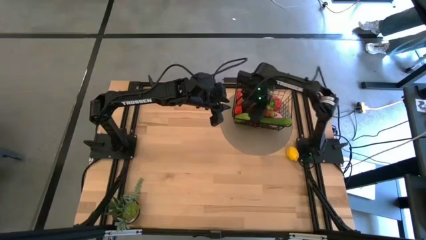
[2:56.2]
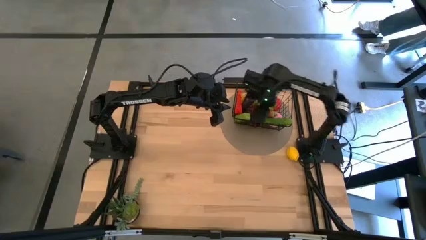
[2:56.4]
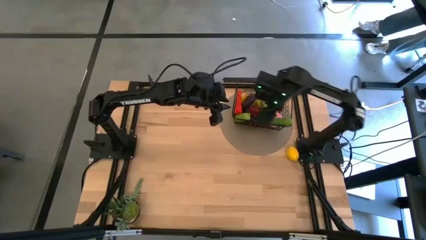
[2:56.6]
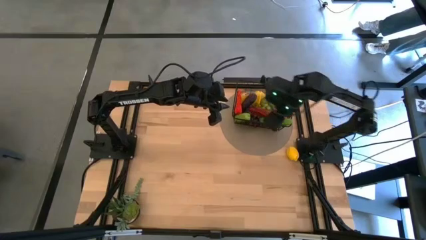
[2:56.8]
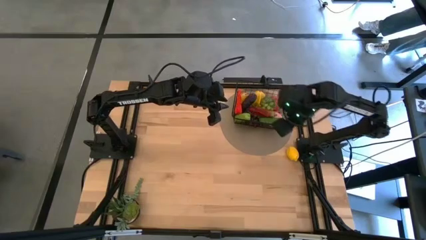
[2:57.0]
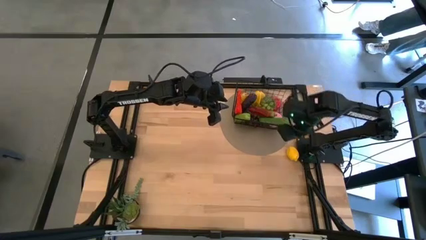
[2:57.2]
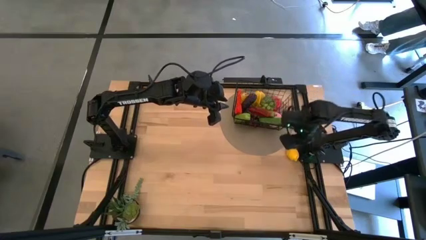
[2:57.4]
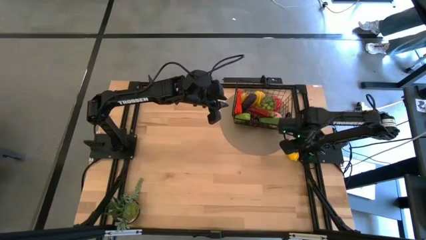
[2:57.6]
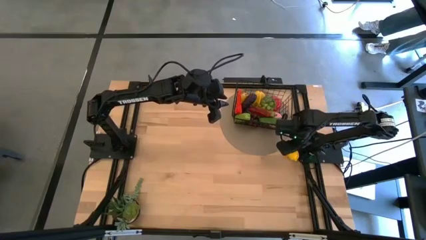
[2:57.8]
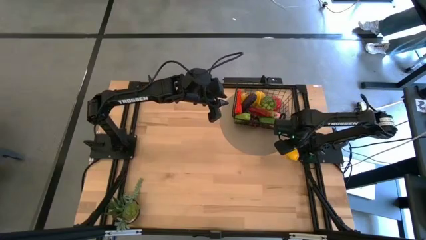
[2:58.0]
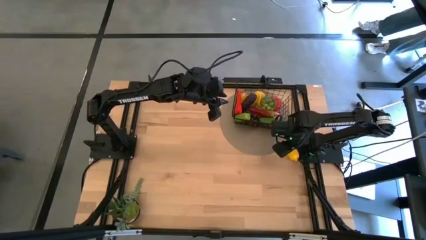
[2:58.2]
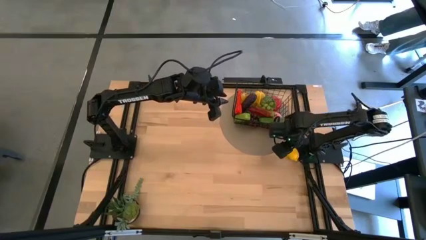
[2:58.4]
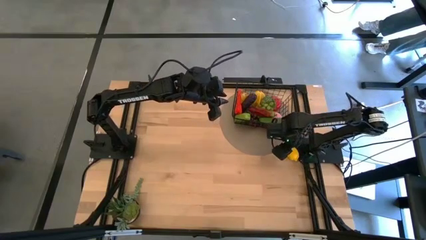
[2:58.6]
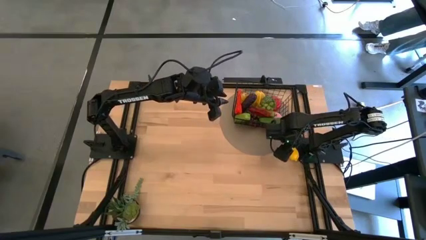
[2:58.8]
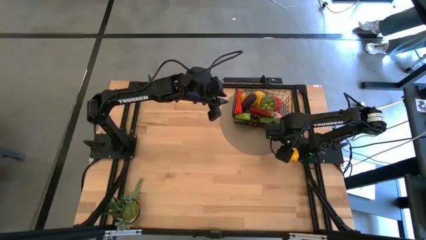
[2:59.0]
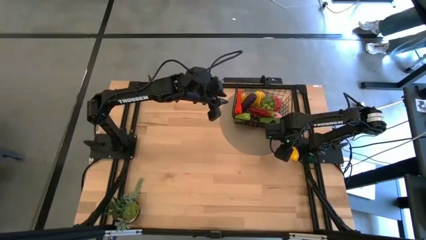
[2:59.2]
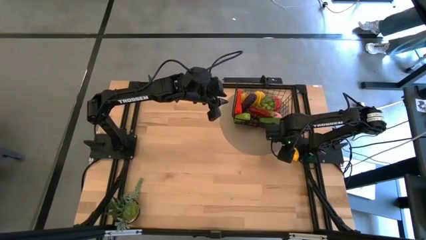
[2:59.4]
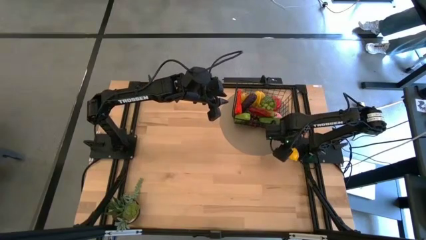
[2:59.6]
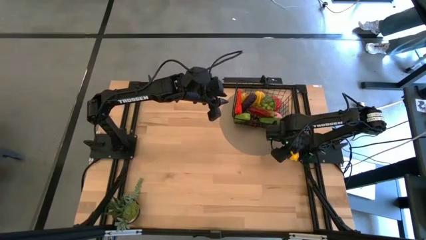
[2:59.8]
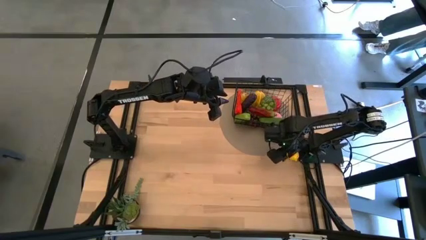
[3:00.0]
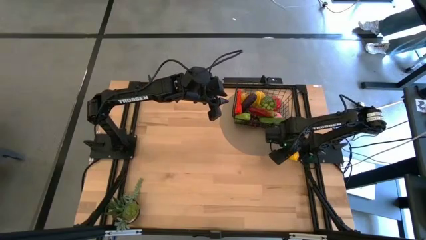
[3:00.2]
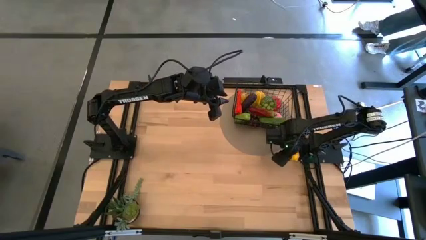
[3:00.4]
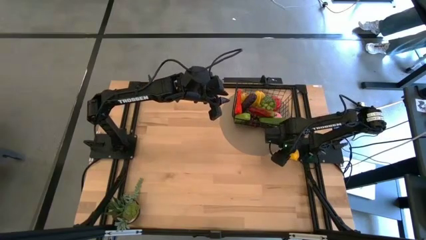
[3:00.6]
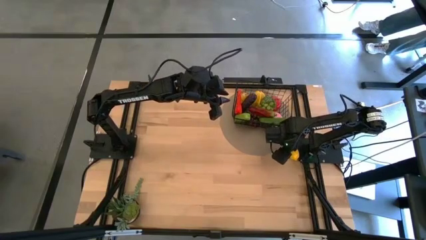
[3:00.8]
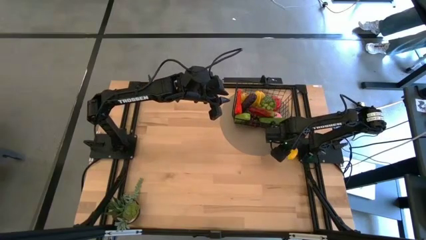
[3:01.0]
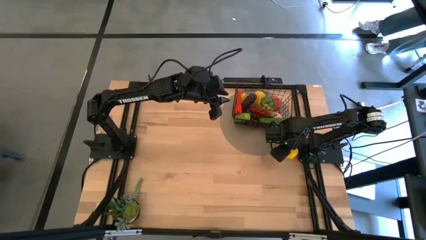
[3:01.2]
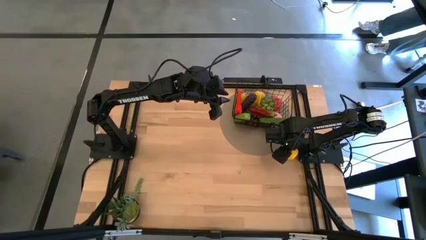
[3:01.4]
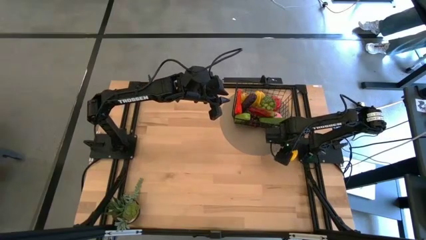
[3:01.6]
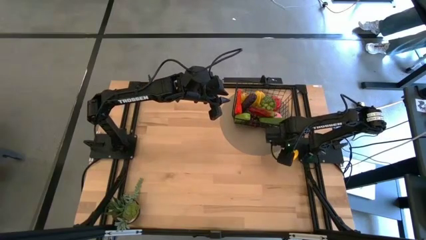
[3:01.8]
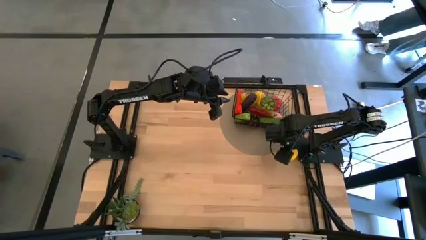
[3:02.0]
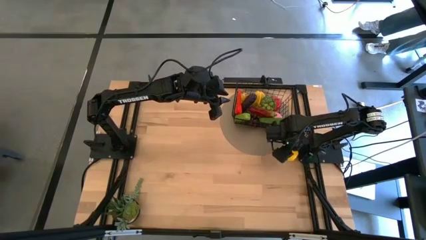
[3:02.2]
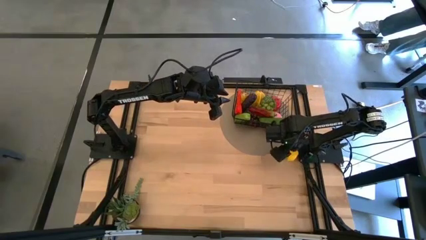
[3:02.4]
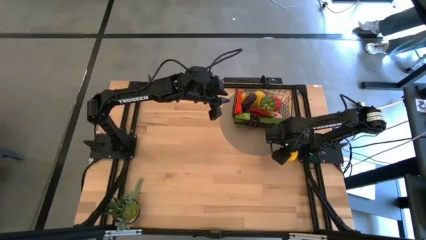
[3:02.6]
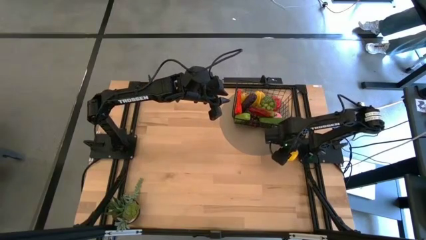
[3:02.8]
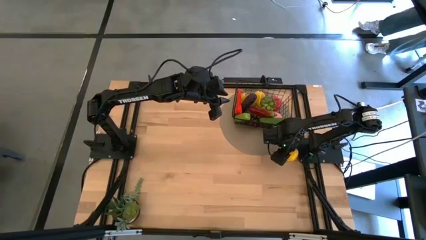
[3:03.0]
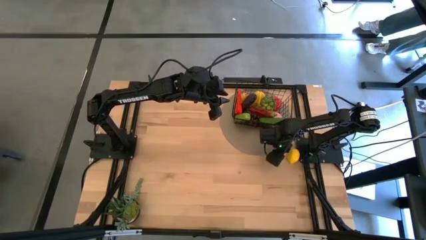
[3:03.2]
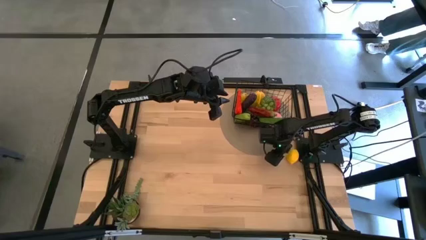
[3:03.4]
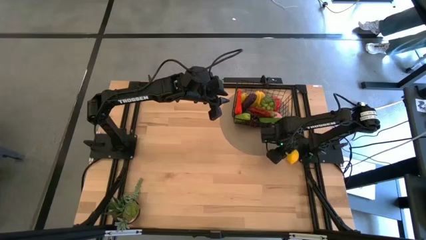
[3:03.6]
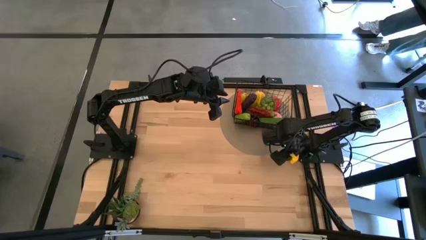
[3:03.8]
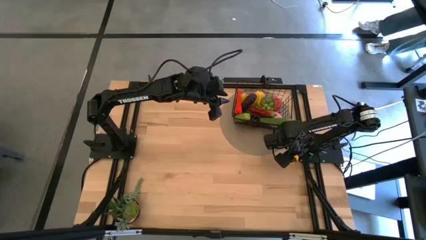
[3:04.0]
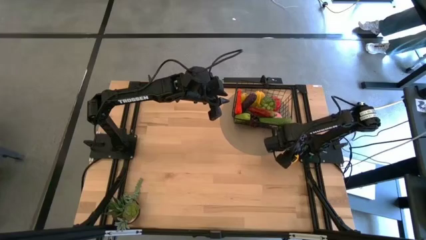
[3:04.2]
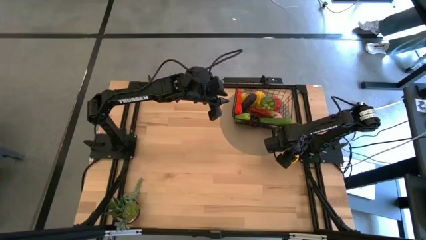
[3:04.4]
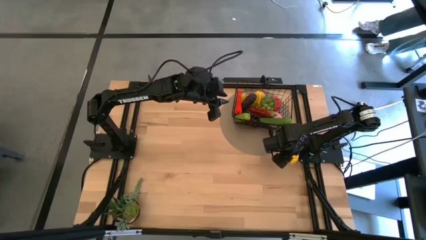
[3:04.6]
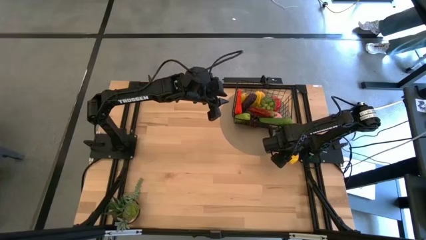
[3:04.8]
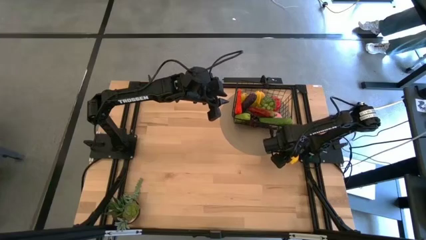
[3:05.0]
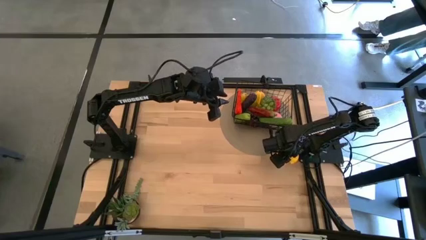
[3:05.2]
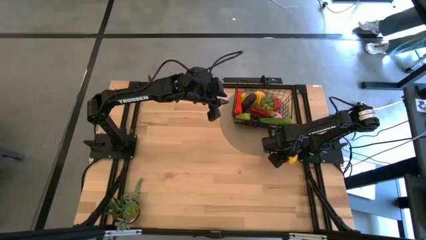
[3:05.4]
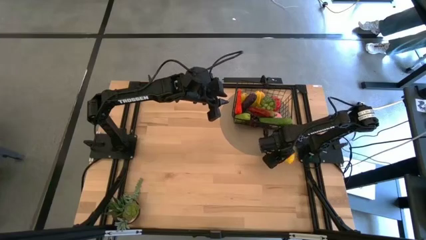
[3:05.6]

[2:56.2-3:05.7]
Task: Build produce basket
Put the yellow lemon into the black wire basket

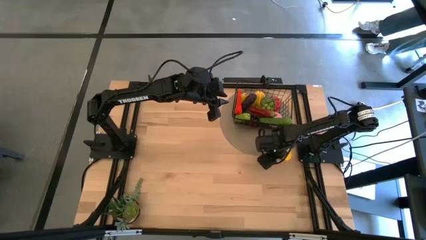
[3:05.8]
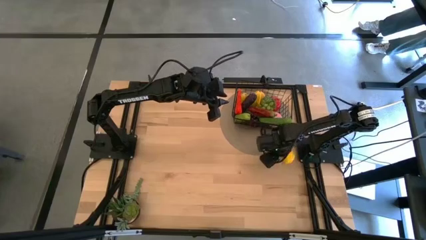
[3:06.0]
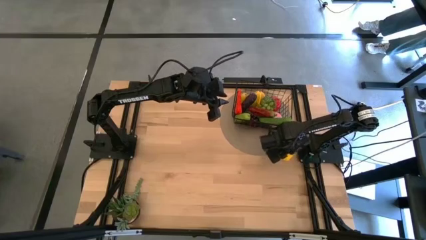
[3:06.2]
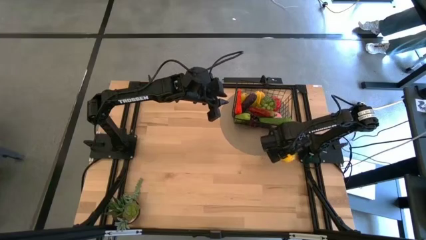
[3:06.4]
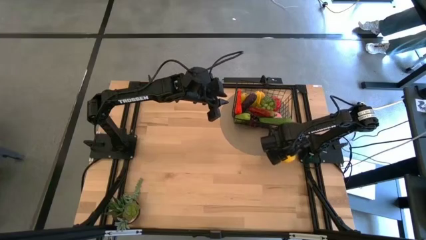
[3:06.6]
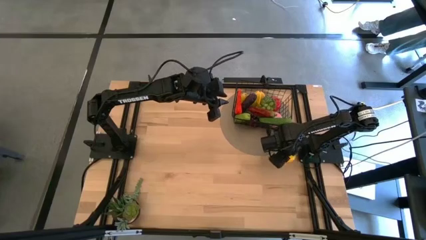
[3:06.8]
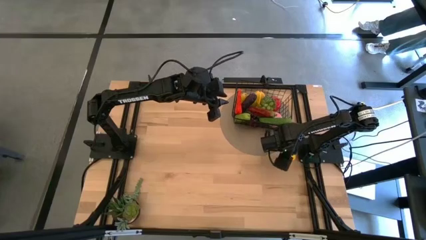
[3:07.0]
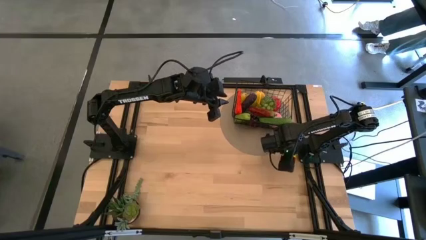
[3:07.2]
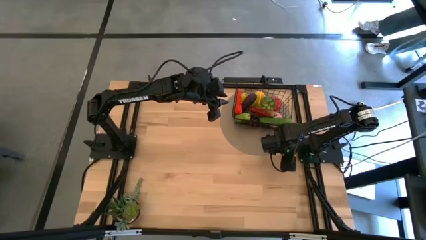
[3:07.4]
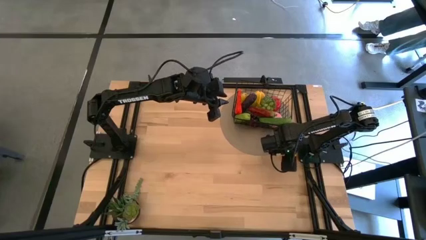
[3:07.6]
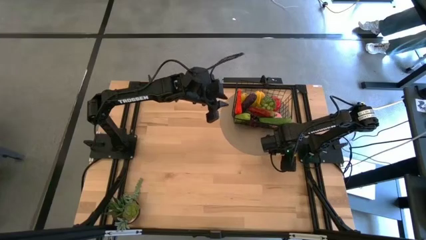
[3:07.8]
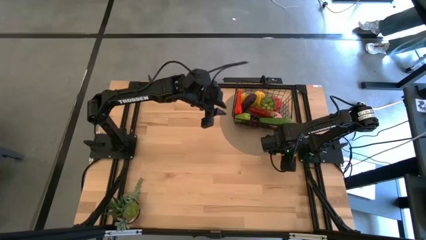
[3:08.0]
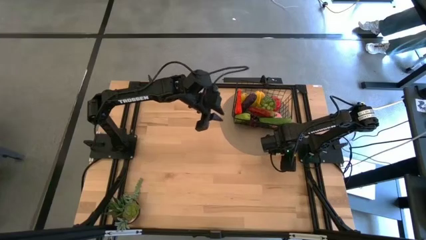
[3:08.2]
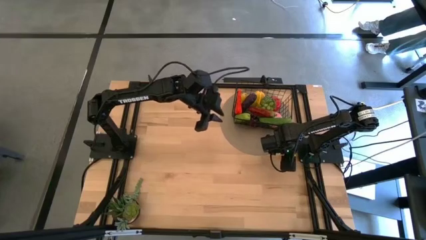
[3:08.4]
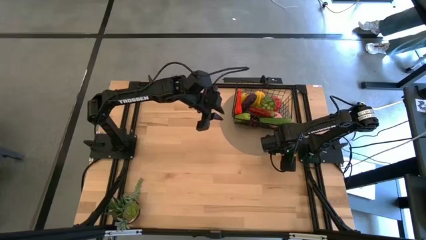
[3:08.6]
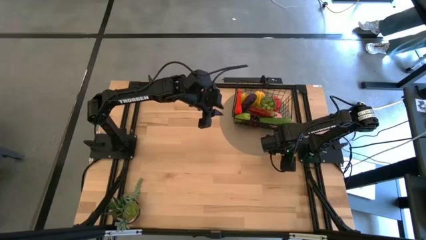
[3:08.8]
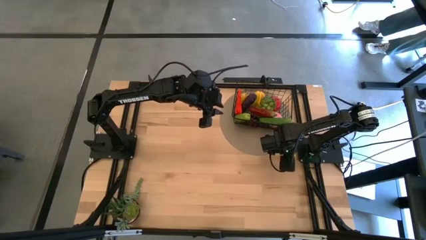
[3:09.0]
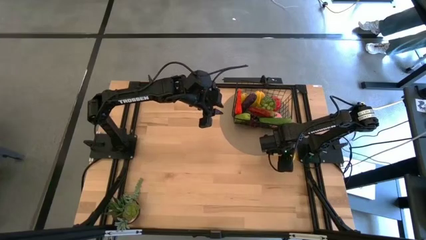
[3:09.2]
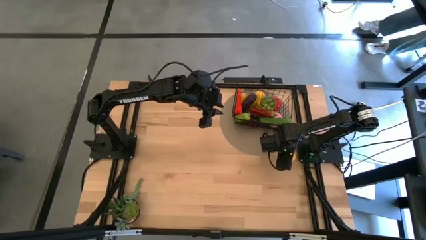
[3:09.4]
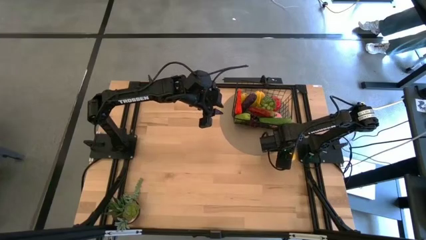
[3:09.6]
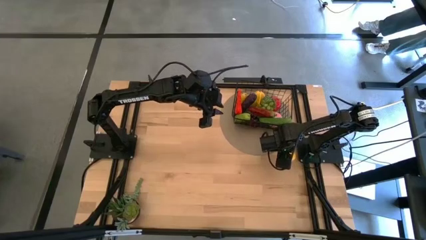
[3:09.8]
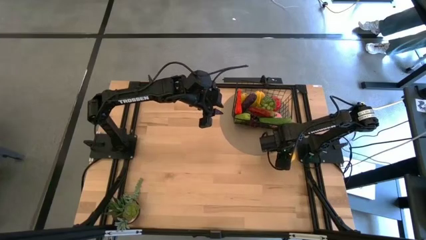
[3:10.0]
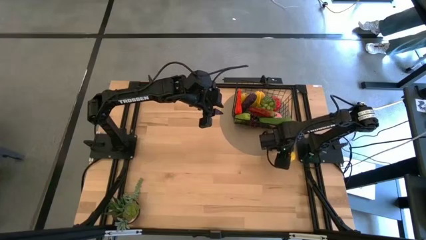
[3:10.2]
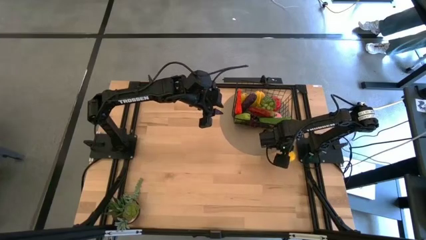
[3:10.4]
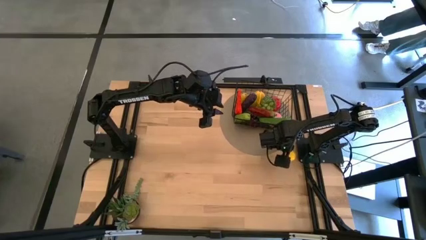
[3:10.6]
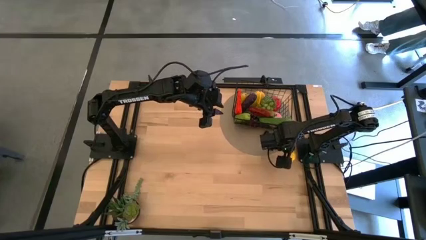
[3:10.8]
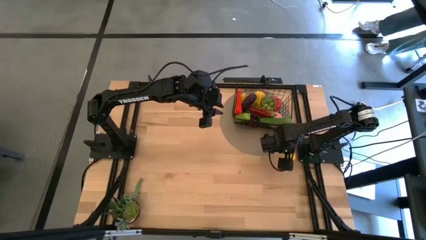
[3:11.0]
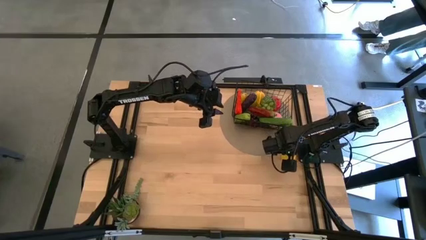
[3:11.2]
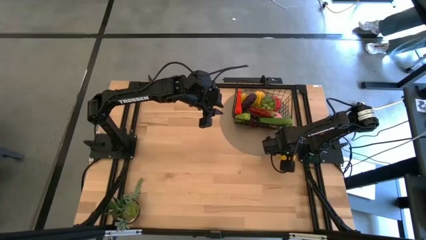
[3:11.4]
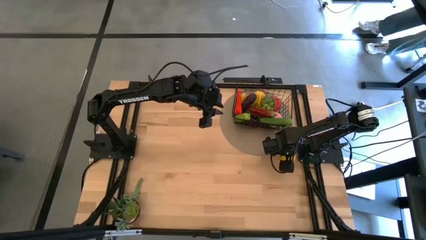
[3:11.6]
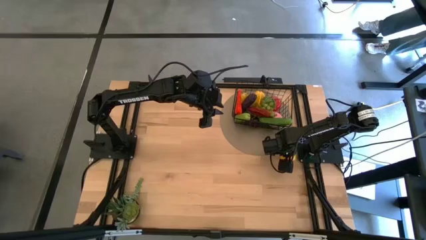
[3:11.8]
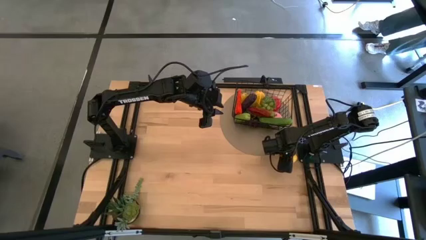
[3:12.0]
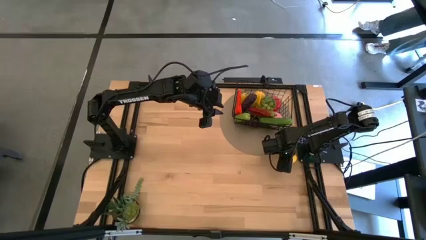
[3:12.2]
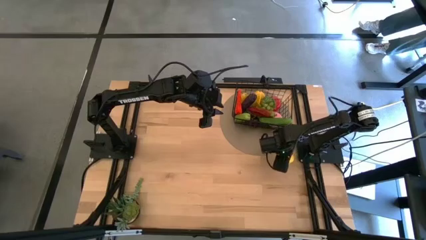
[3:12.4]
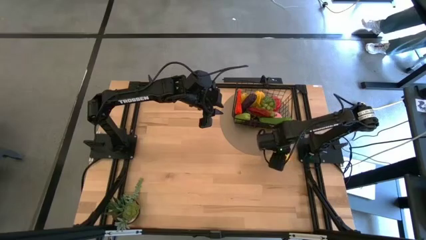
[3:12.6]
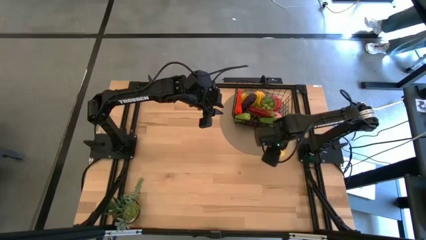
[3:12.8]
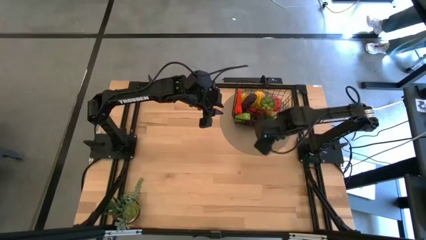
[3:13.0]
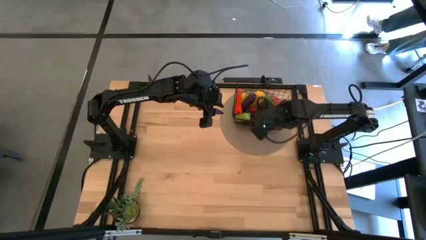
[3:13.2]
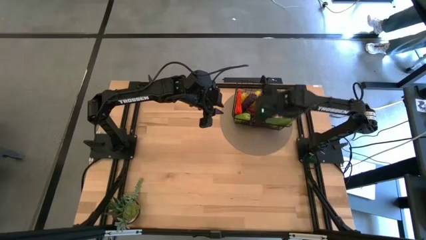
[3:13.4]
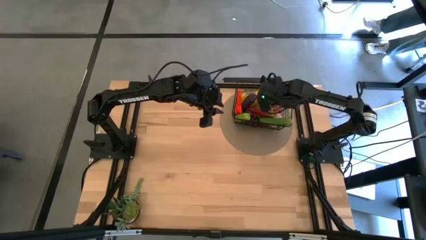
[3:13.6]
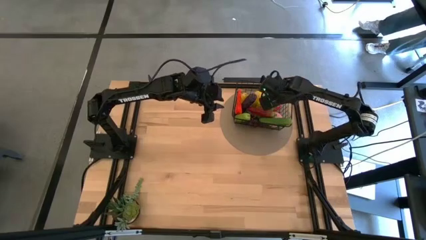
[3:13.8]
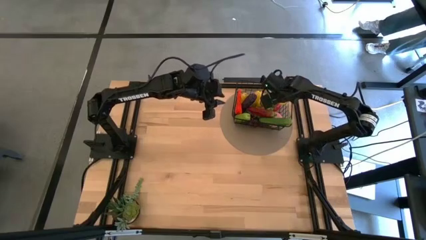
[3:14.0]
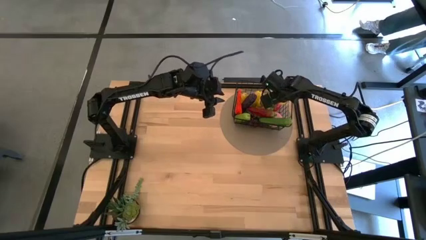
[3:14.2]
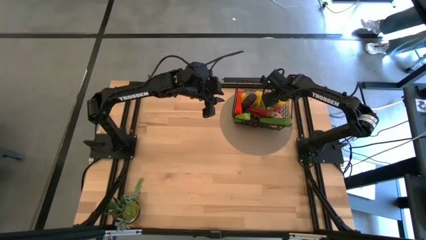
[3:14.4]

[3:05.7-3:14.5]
Put the yellow lemon into the black wire basket
